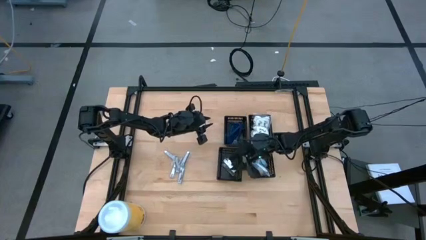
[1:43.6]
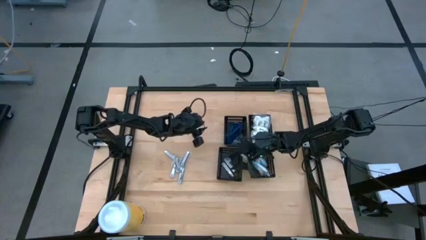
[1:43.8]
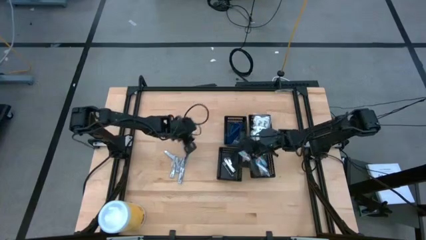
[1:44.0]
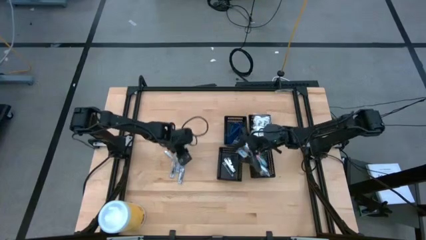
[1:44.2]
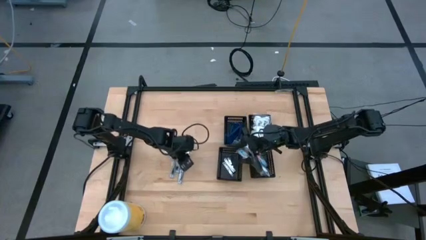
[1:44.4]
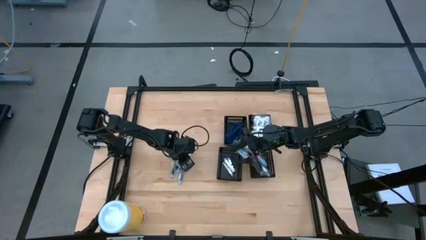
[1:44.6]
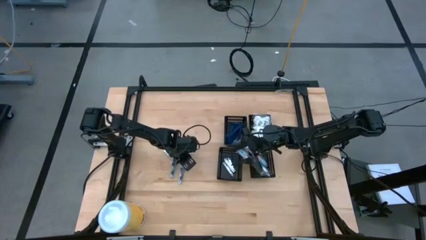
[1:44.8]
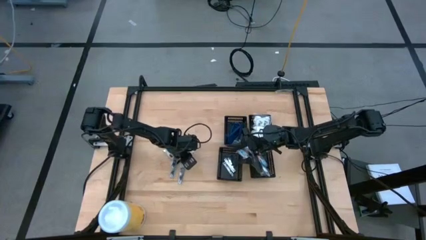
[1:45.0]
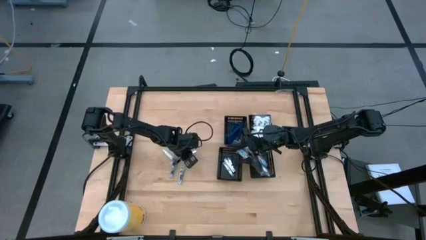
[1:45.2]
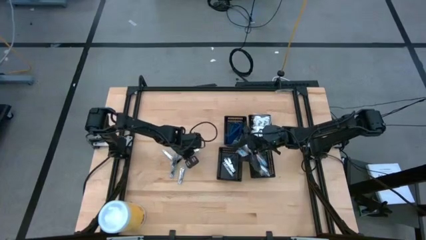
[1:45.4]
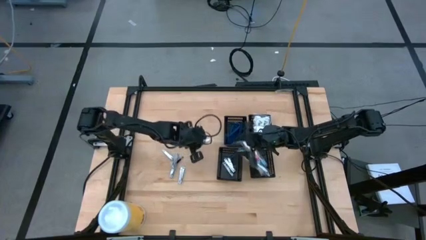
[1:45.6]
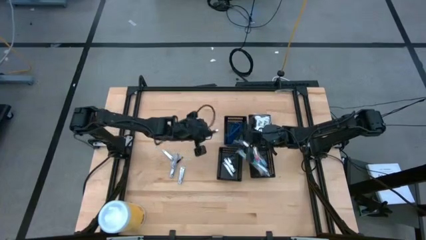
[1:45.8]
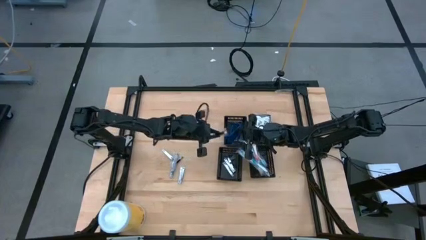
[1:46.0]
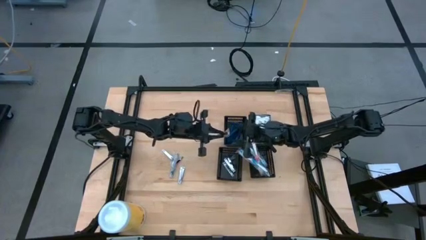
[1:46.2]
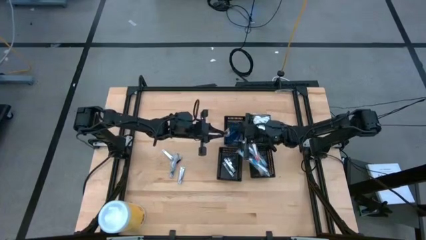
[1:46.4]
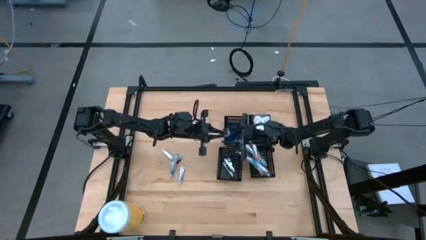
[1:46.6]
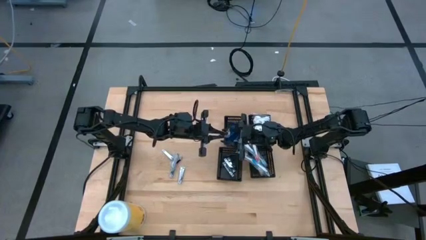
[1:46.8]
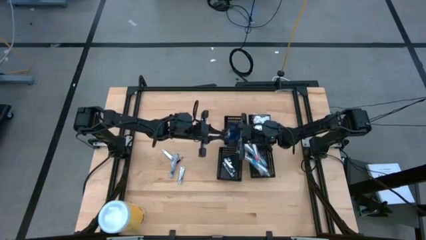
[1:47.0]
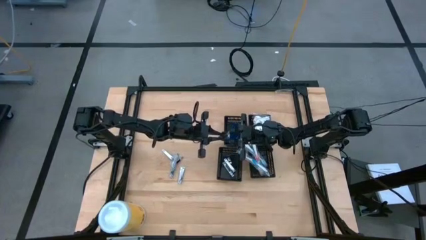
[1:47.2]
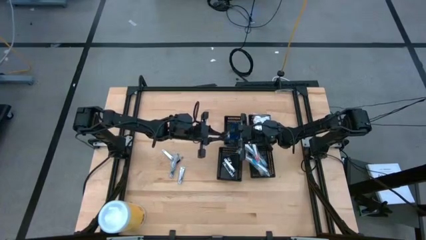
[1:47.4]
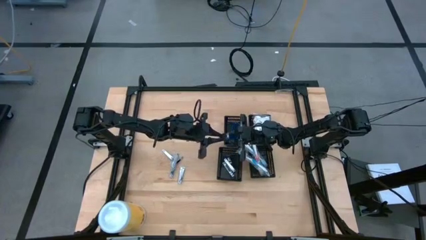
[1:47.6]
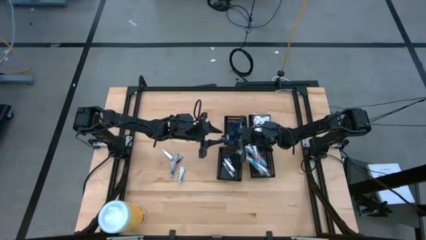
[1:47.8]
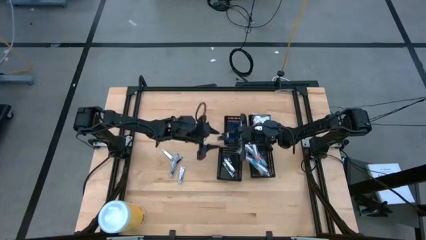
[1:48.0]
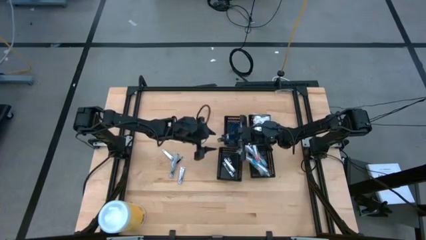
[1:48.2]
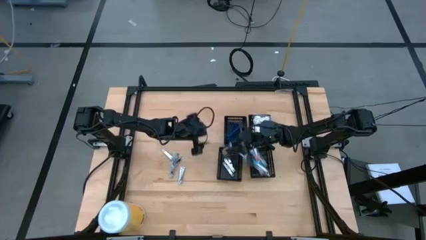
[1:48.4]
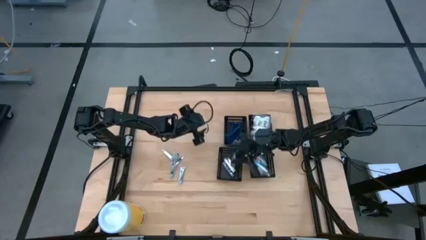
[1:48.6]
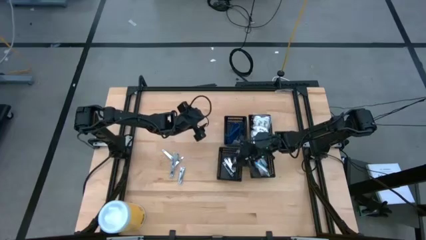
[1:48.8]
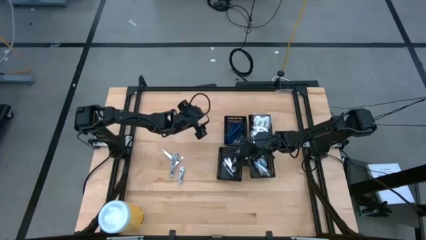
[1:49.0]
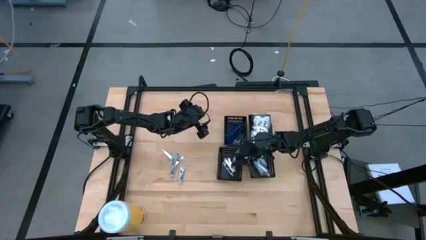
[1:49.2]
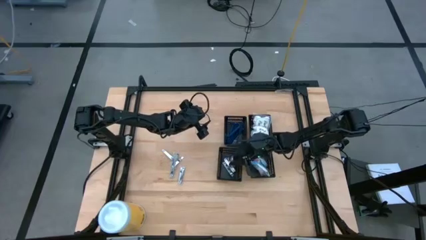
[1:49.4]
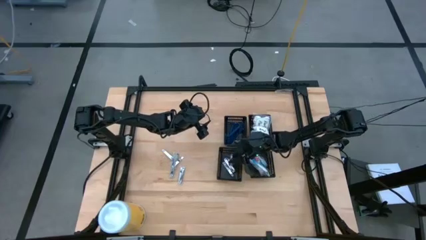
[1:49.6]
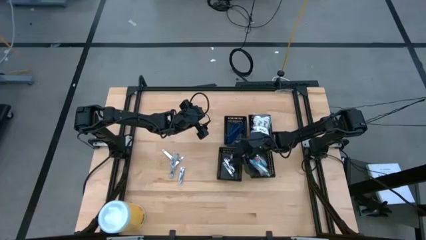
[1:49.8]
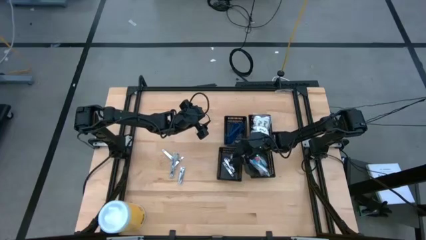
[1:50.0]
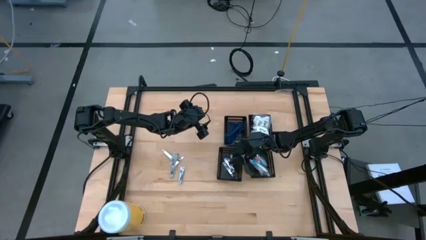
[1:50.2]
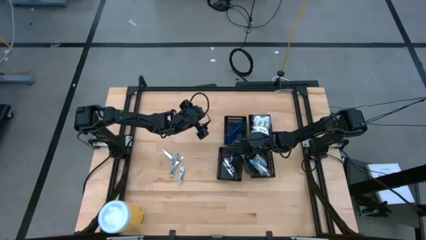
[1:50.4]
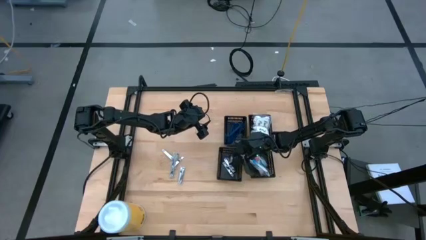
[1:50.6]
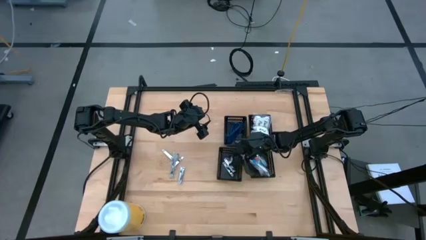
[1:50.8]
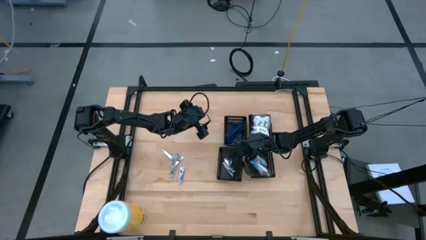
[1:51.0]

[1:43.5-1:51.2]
Task: Pick & Place Travel size toiletries
Put the nail cutter into the bottom left black basket

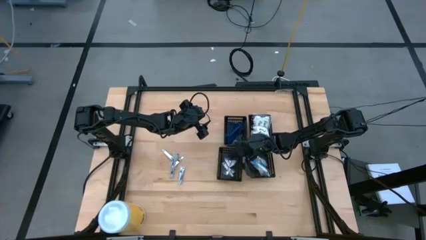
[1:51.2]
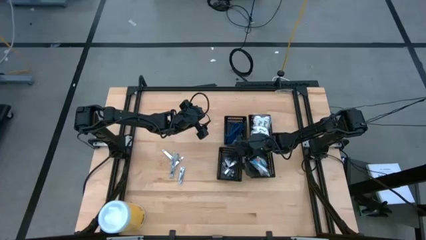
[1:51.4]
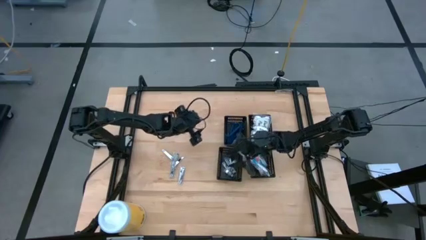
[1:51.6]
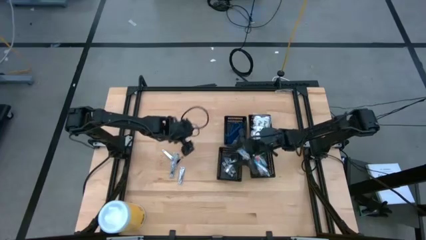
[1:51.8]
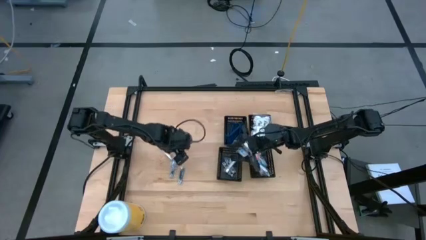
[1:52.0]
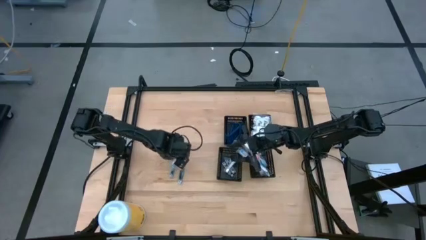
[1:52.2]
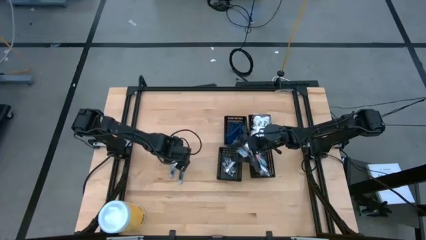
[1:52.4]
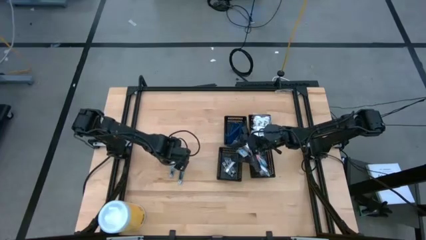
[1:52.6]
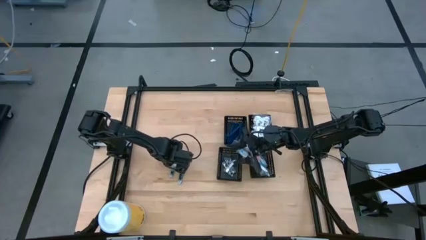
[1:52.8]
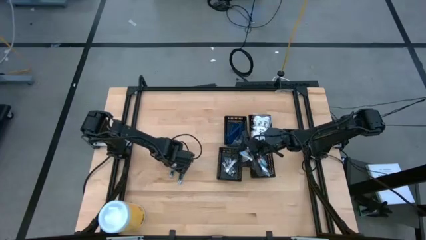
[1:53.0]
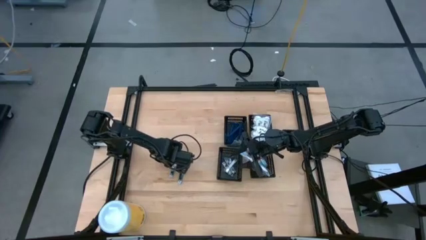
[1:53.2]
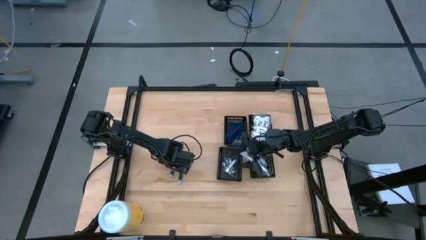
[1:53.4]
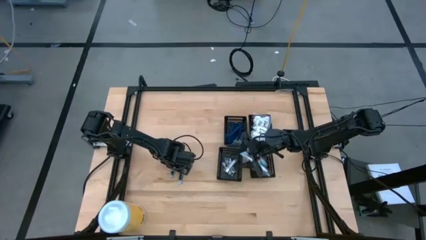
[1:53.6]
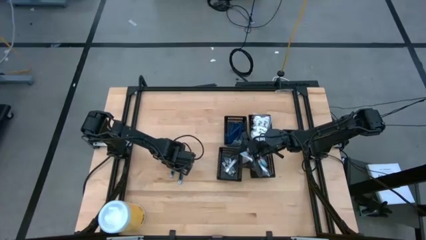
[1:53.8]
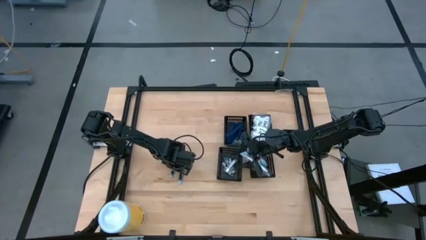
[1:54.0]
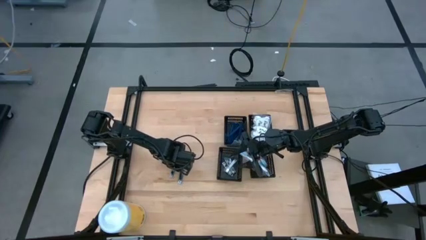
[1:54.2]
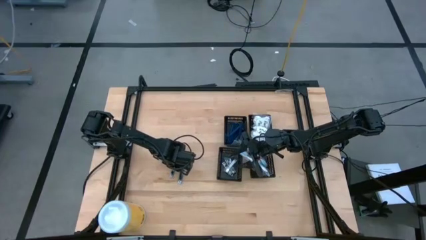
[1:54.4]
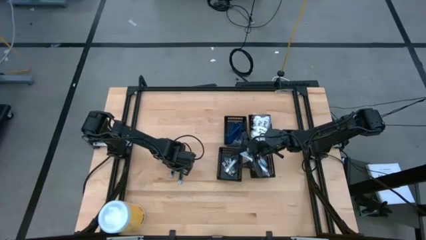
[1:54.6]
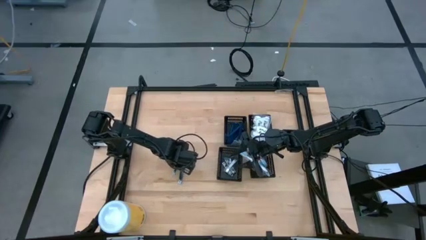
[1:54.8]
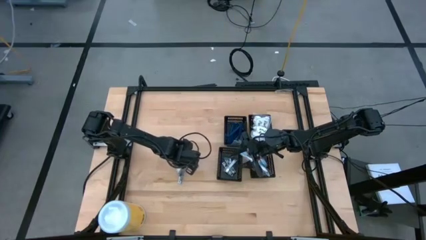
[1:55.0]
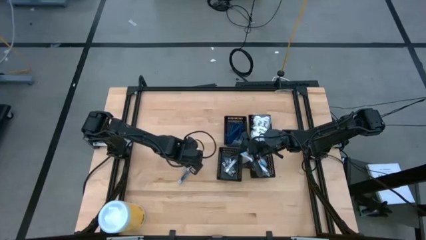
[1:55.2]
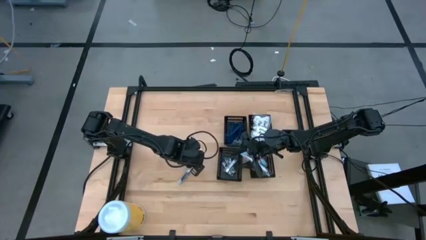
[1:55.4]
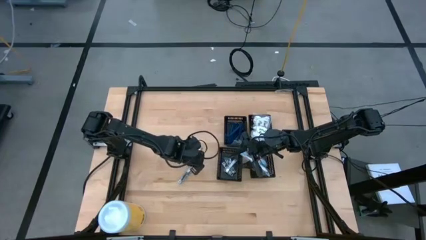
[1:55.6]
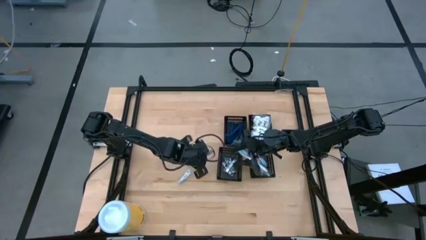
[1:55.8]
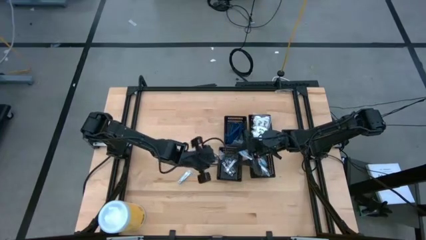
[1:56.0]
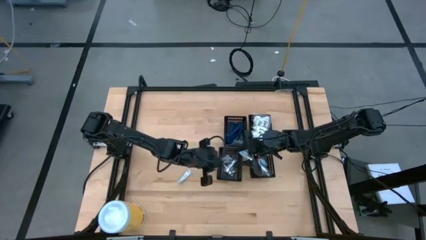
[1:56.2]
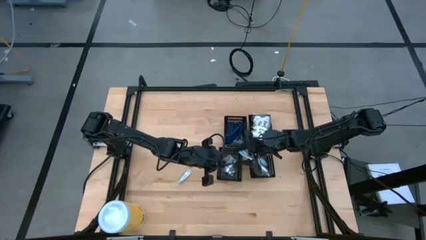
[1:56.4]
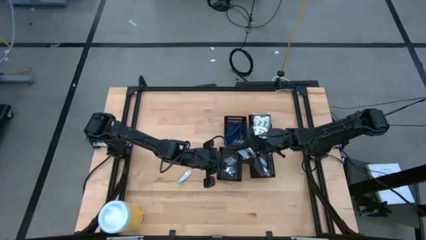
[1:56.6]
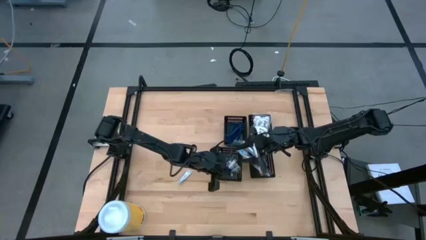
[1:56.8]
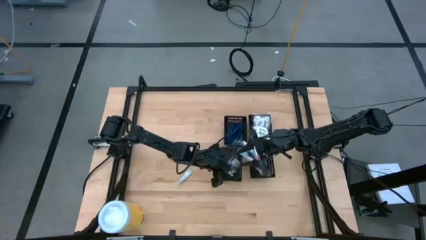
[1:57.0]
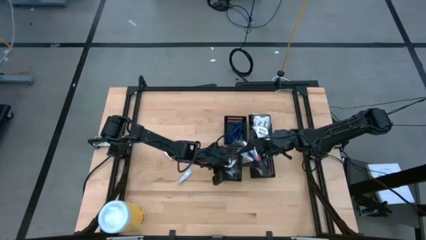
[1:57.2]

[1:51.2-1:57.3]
Put the nail cutter into the bottom left black basket

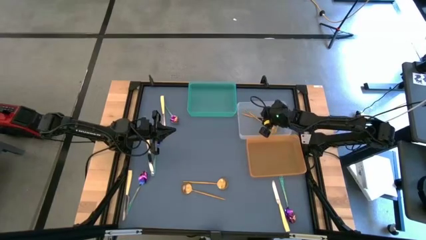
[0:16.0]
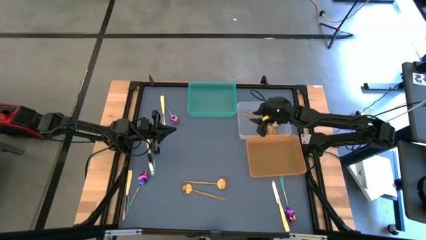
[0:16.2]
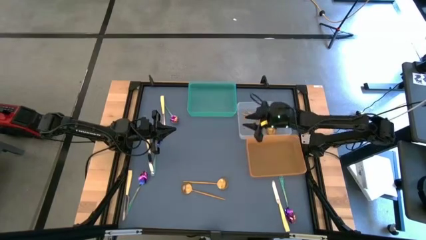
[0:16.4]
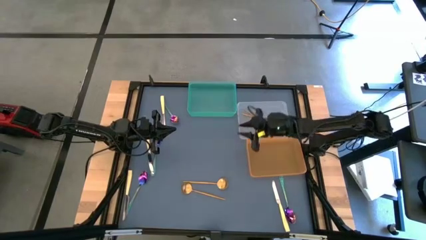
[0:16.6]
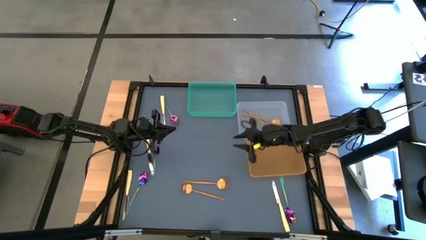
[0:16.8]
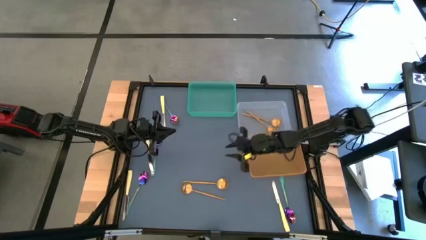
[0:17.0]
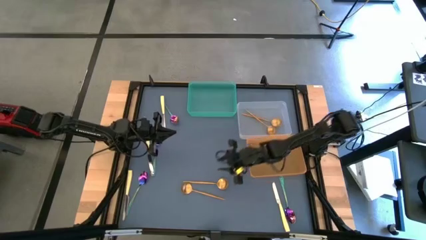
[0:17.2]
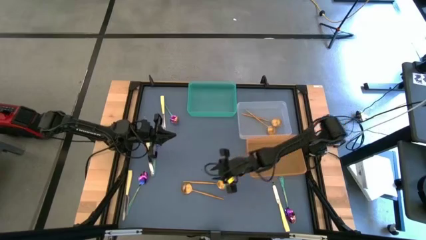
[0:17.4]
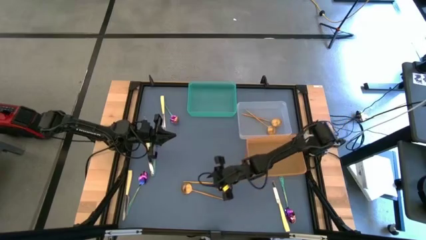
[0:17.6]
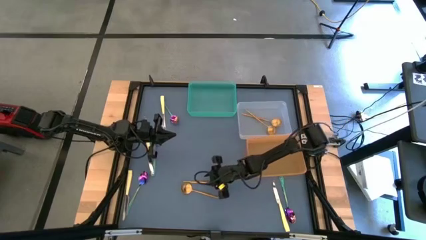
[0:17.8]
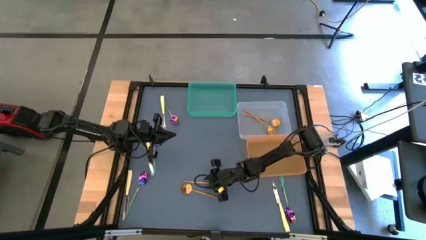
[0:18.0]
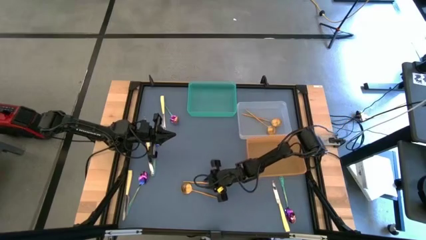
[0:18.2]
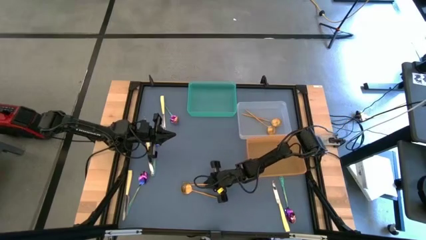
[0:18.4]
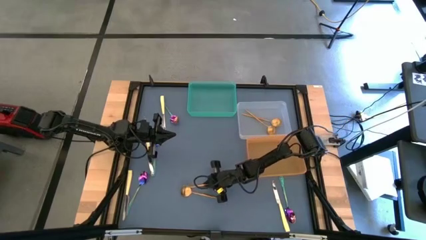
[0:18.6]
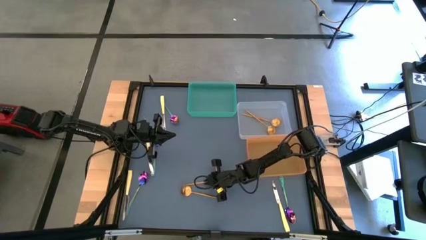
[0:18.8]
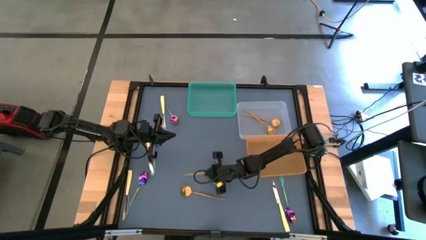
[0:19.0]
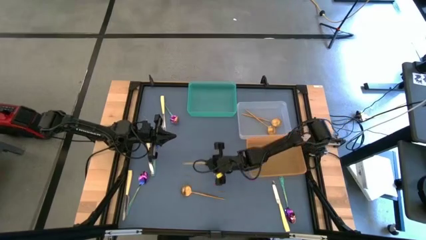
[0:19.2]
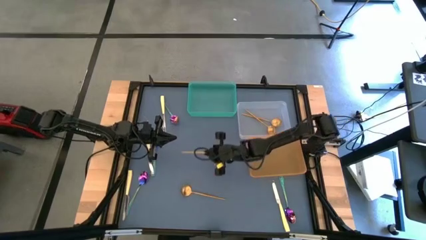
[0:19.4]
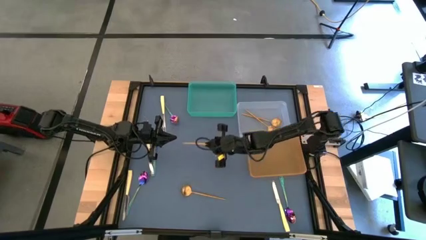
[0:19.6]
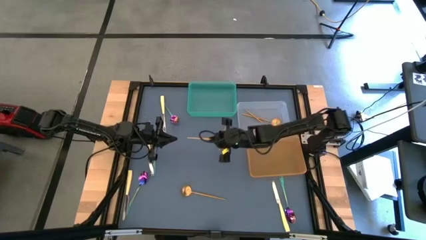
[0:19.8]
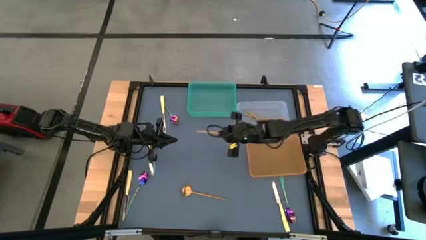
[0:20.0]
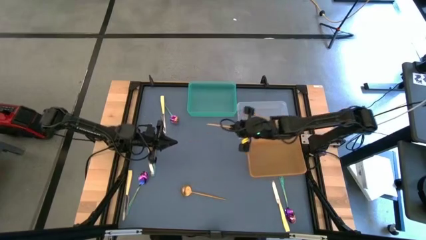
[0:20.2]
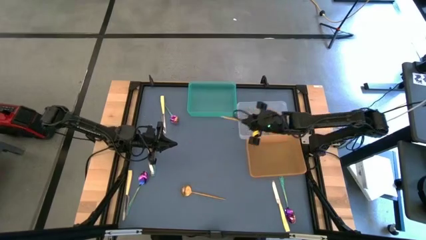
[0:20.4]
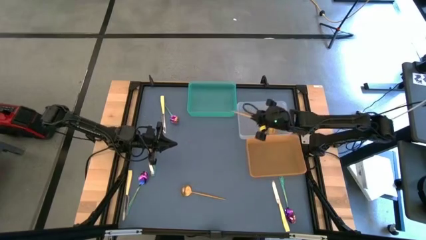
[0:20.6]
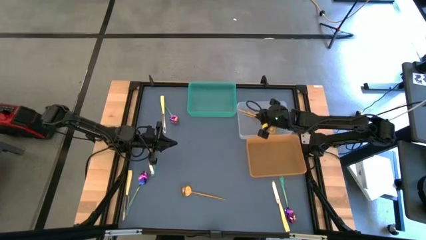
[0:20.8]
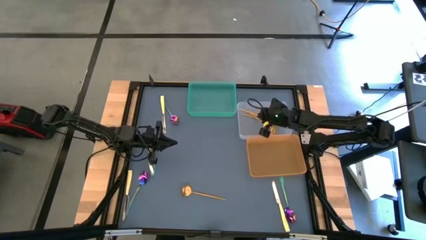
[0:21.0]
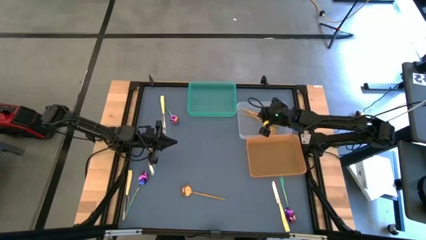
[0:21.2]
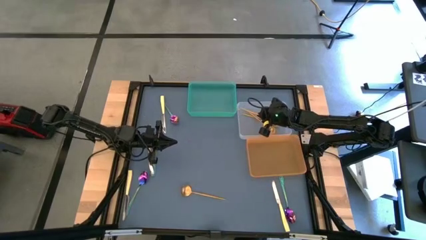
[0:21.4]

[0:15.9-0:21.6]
Task: Sort silverware by color (type)
Put the gold spoon into the transparent bin
